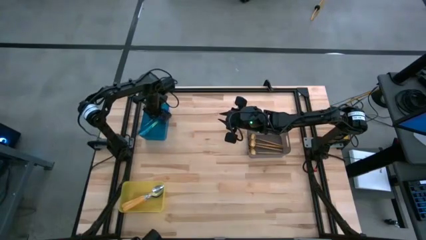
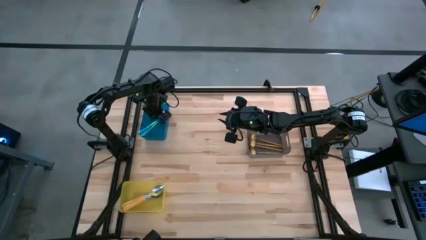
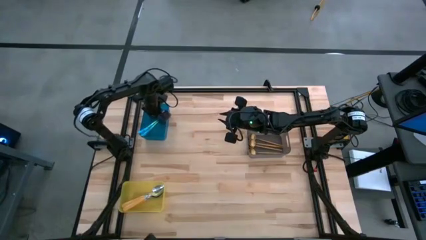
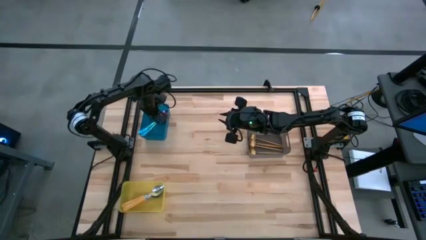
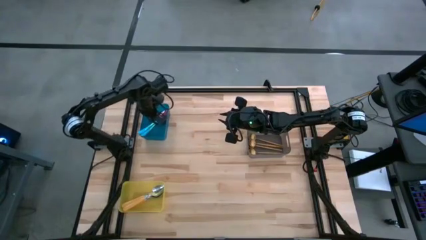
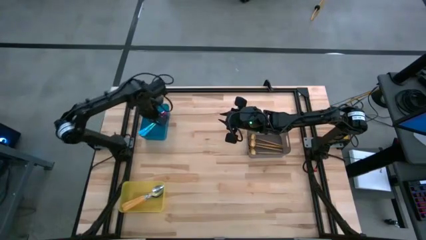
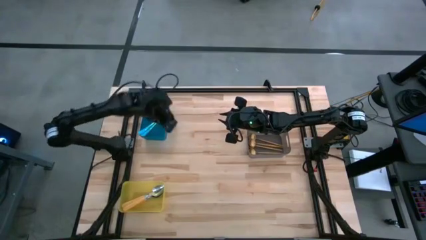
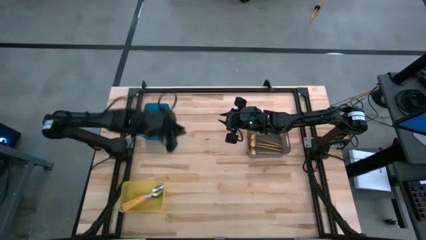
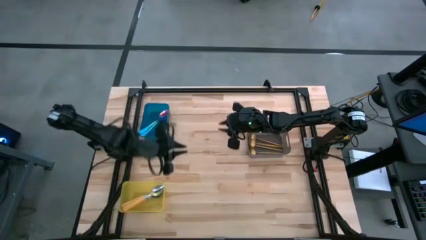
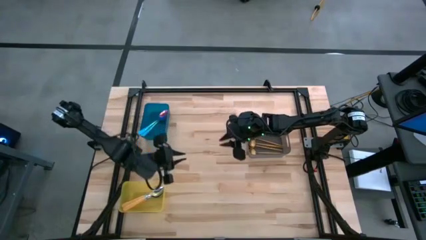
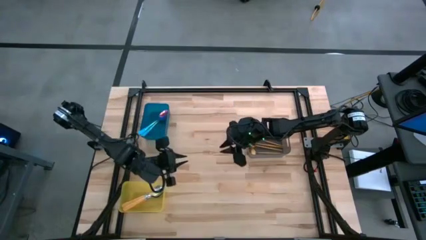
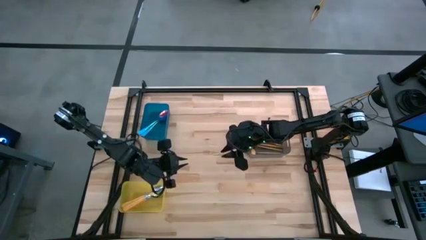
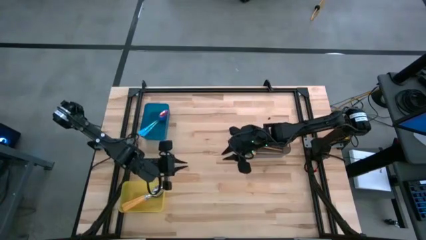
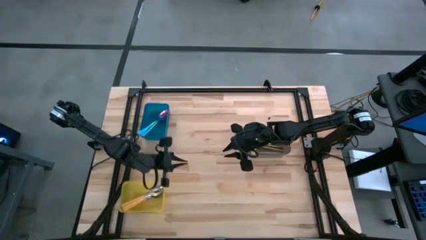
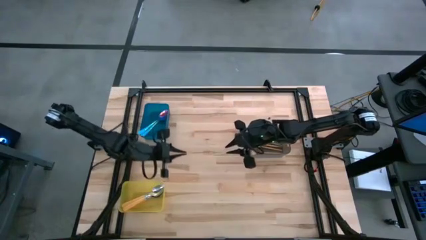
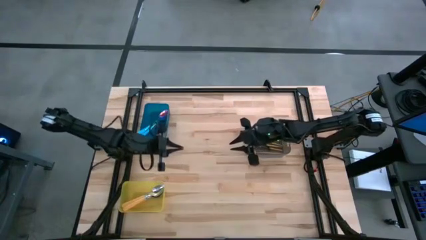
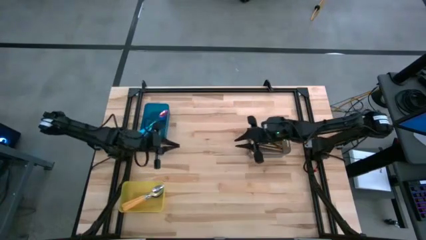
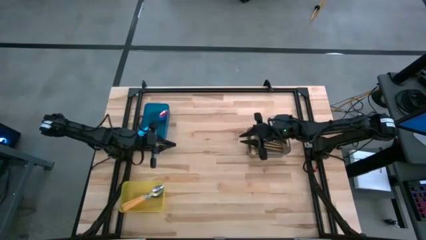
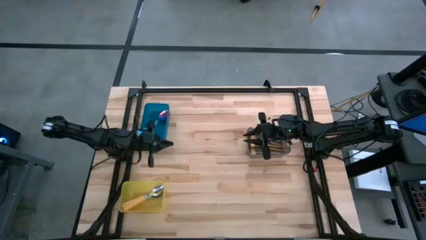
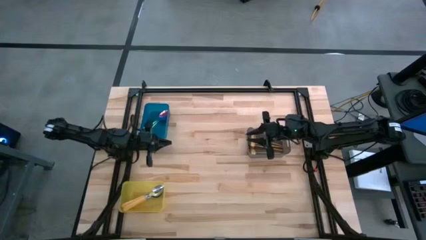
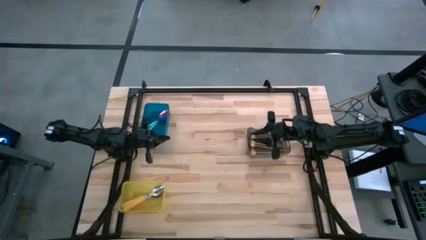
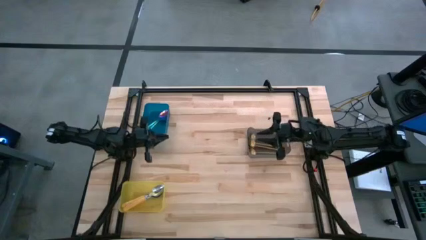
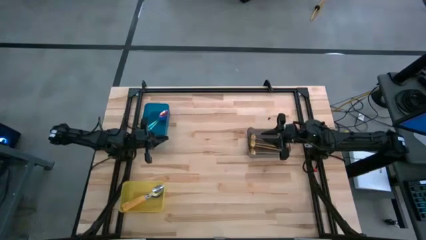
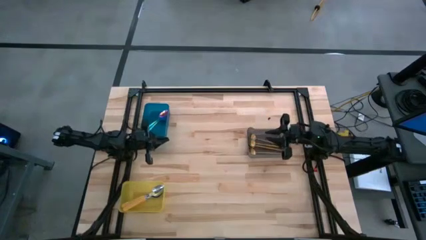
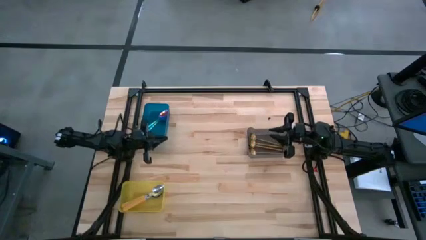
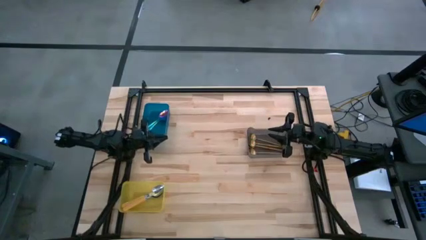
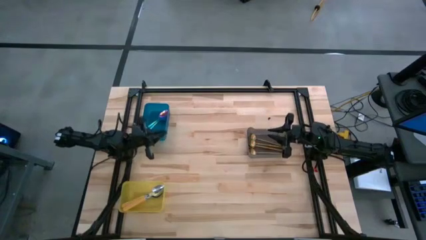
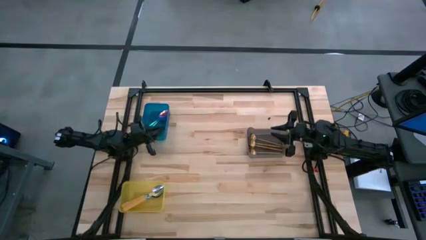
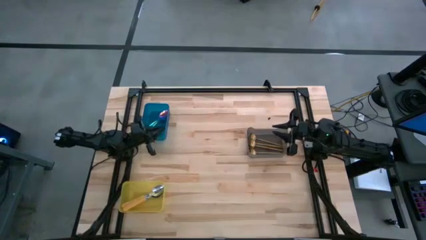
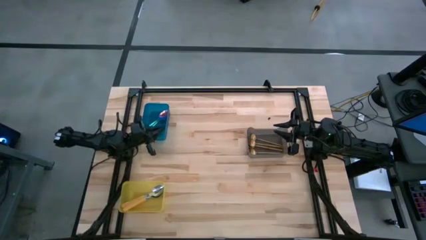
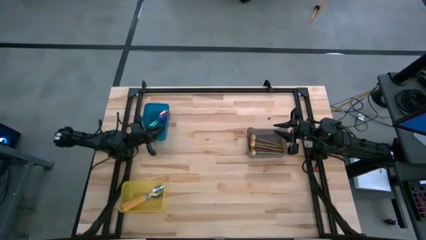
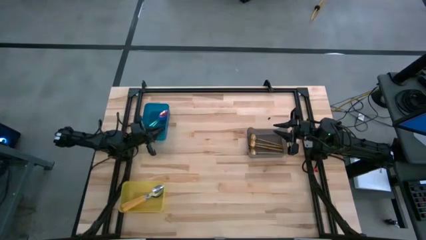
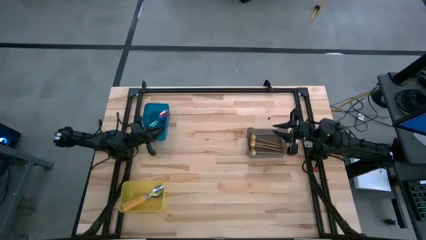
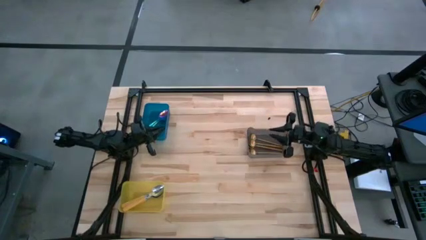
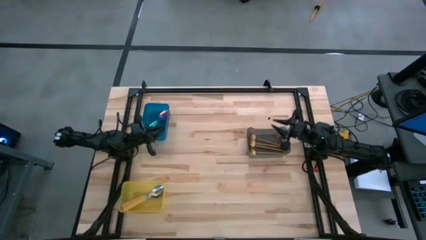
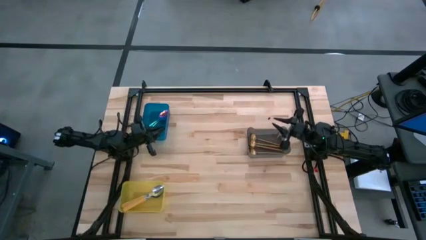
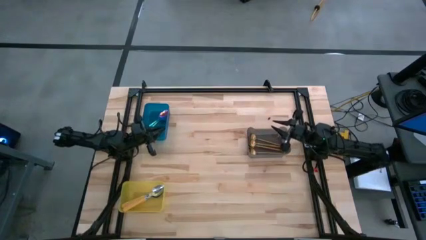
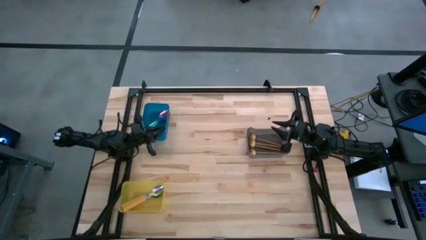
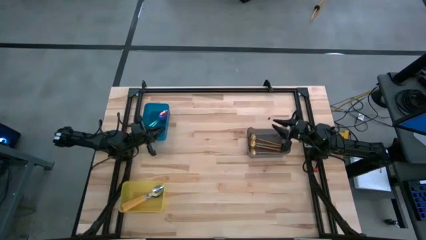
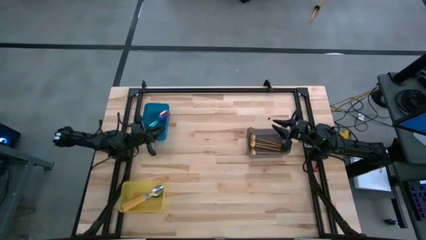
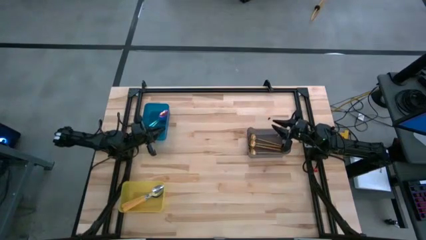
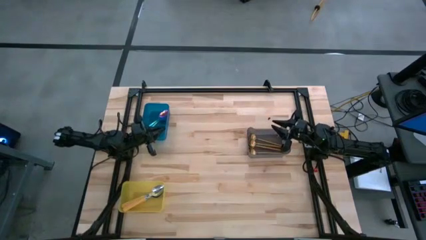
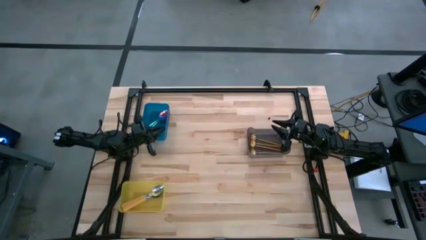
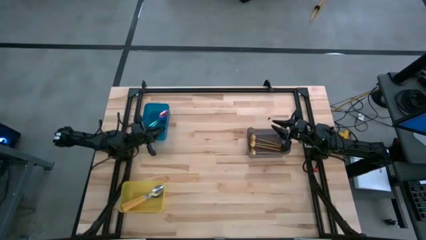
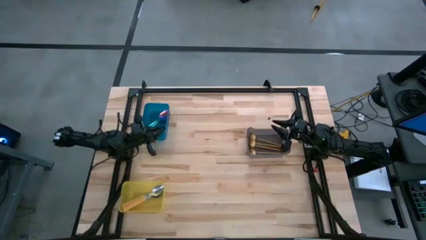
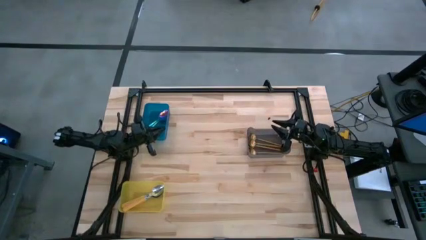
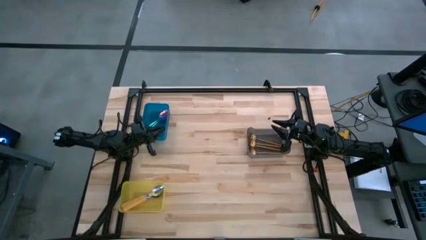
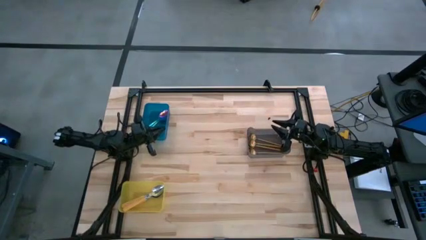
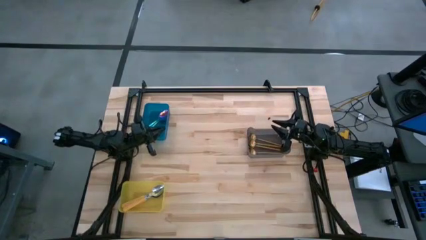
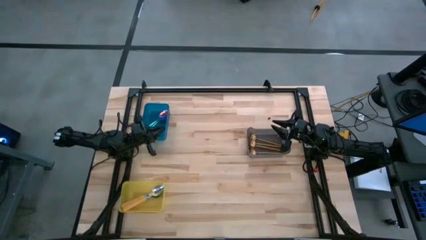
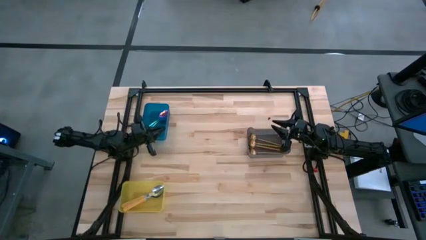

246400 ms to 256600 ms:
Task: Sort silverware by color (type)
Return to Home Position

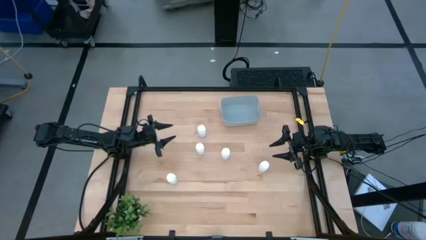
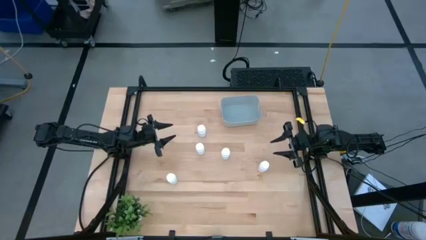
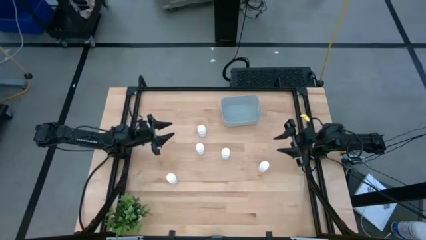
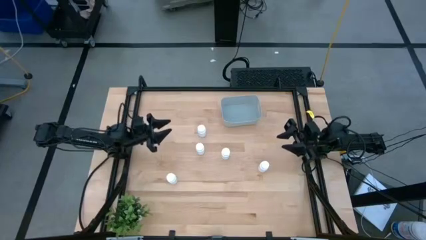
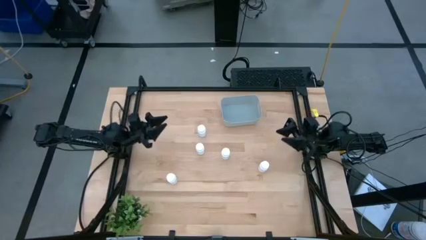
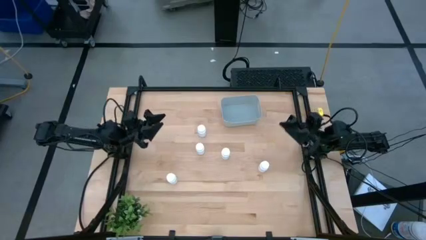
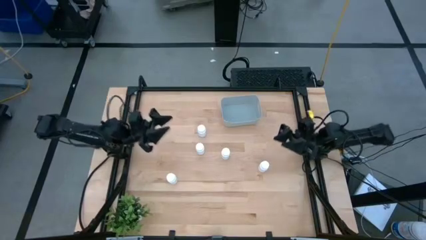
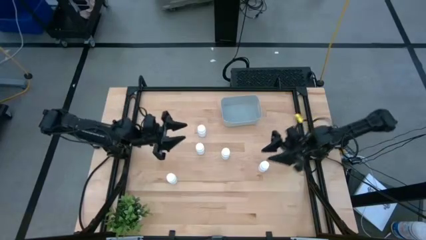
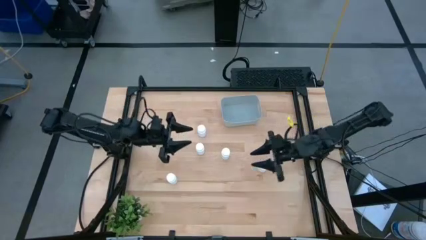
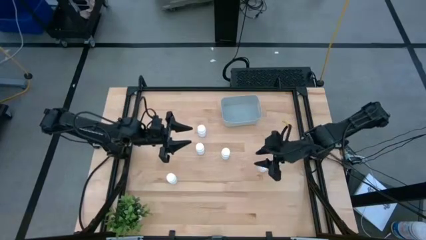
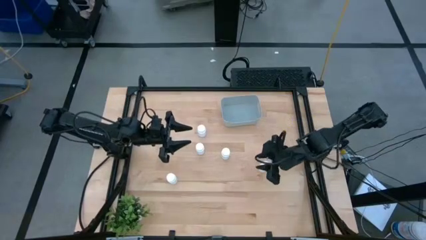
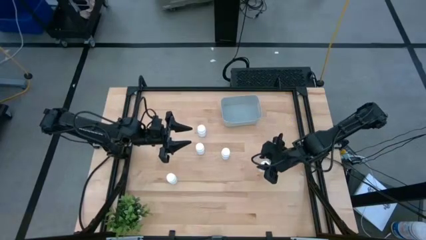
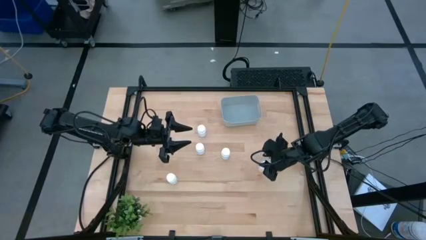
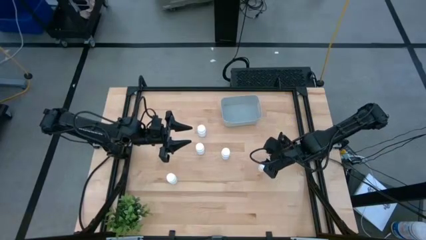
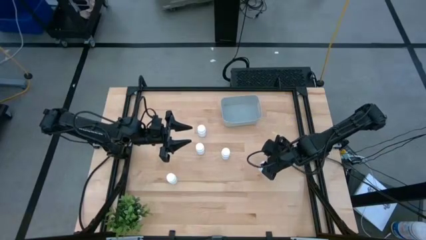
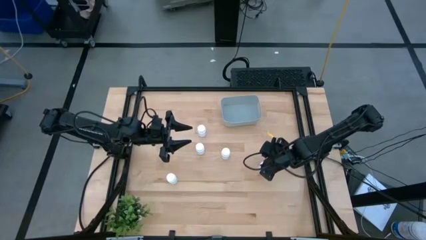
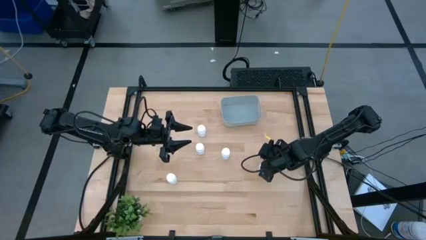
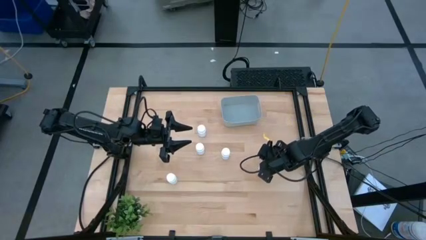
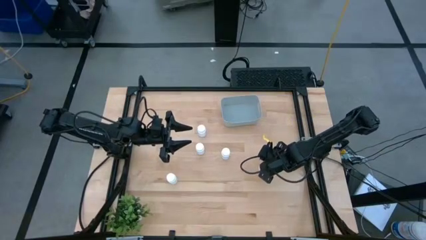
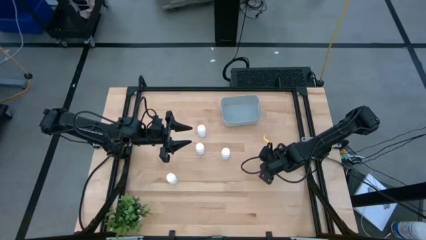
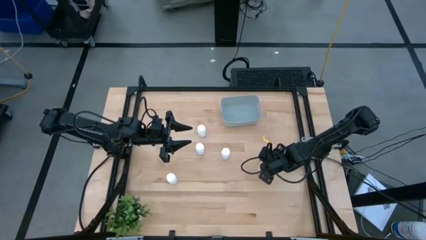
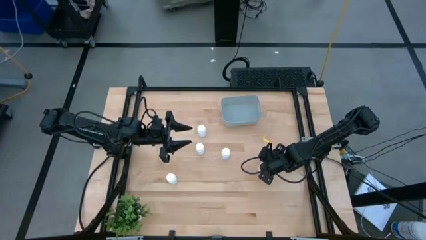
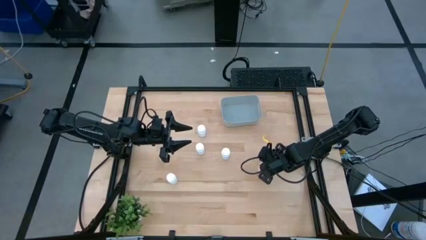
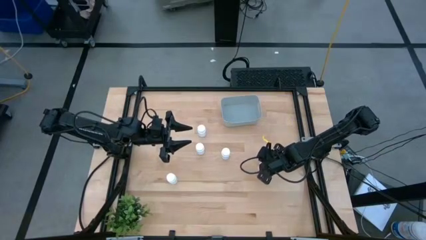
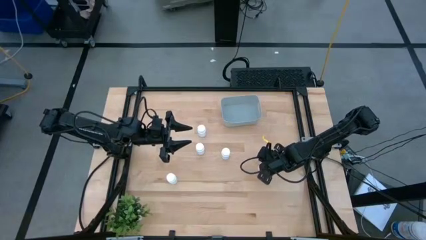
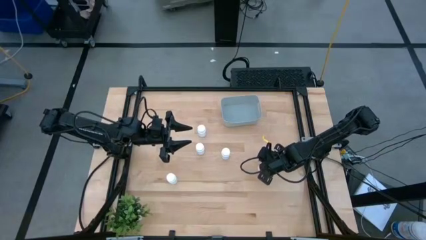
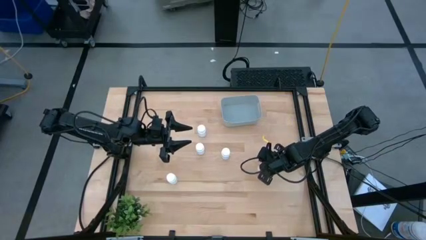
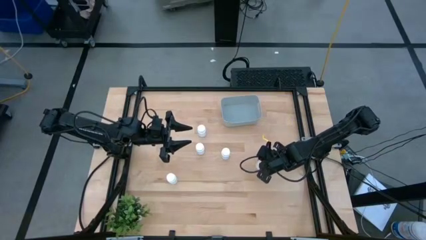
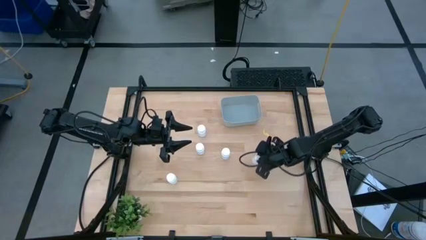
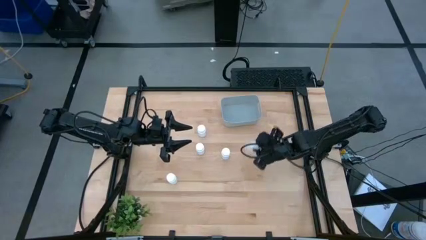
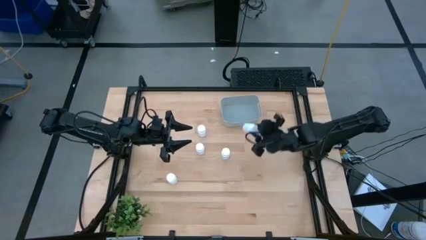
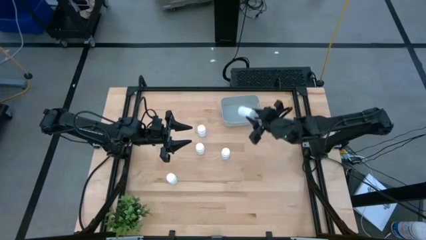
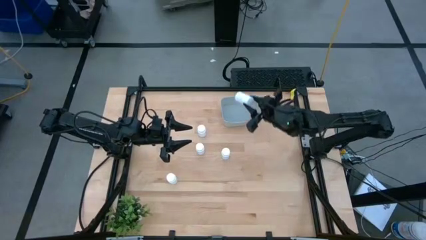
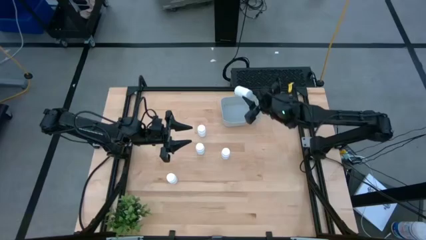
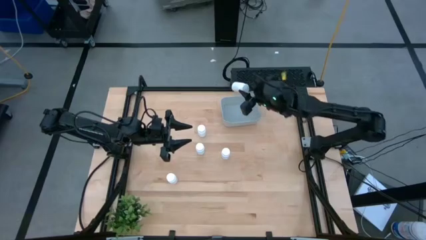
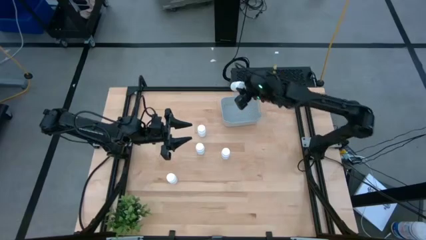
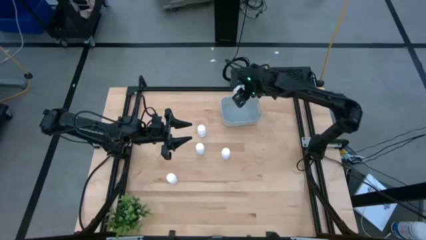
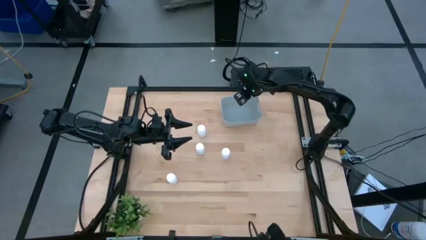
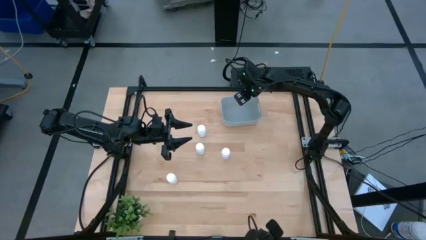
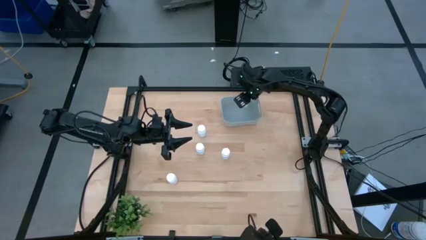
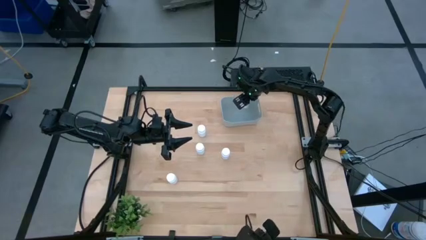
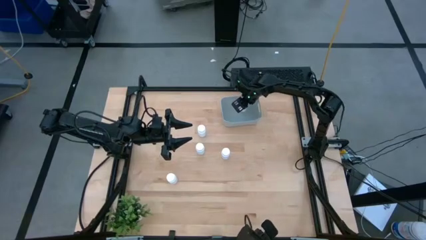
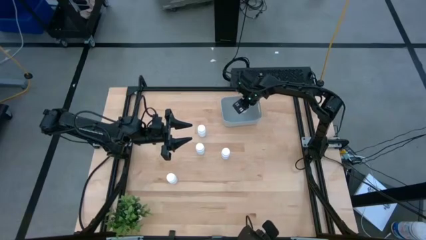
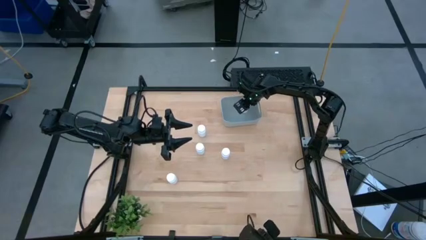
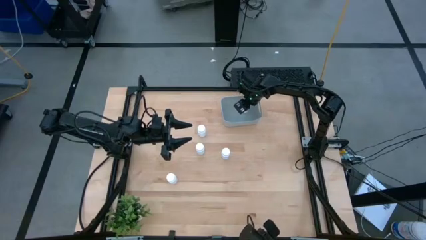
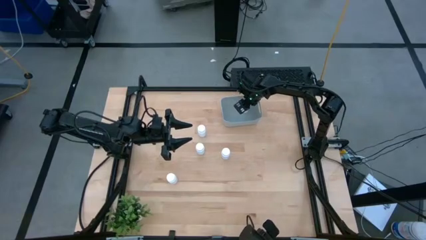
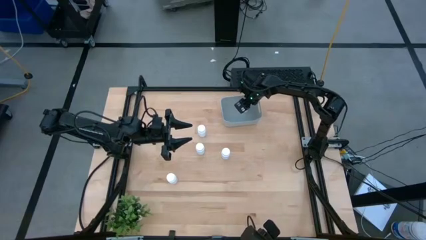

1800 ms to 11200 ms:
Task: Pick and place pill bottles into a basket
Put the white medicine bottle into the gray bin
